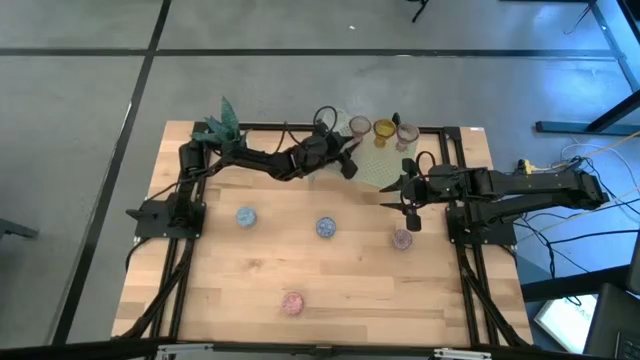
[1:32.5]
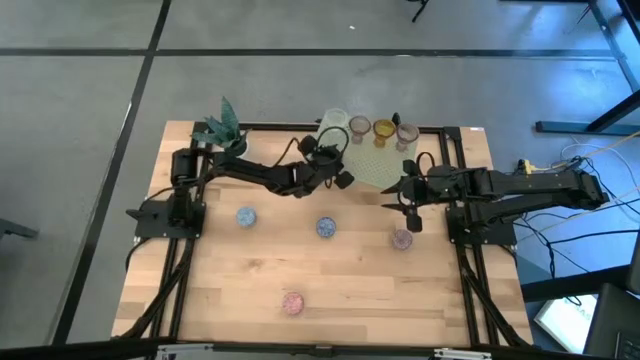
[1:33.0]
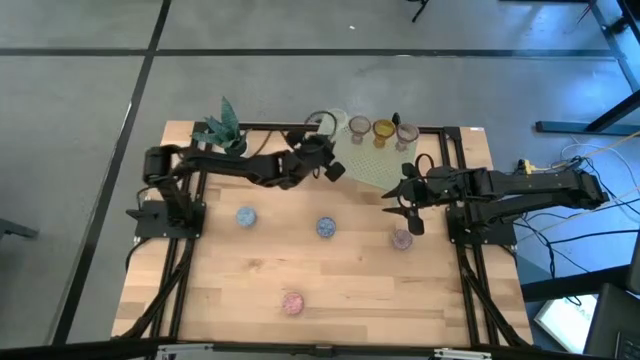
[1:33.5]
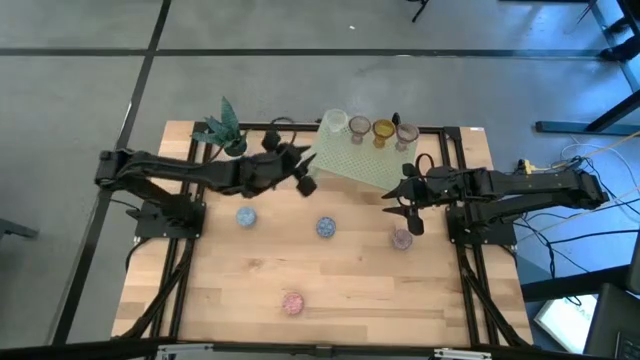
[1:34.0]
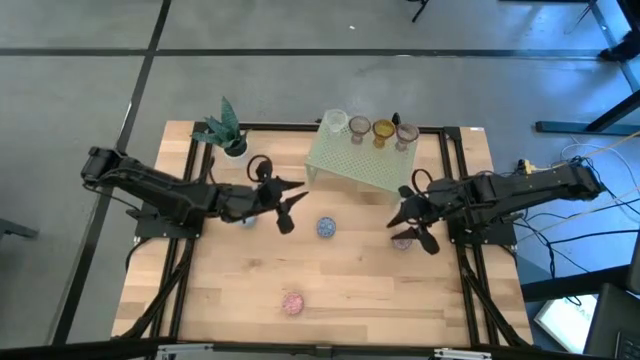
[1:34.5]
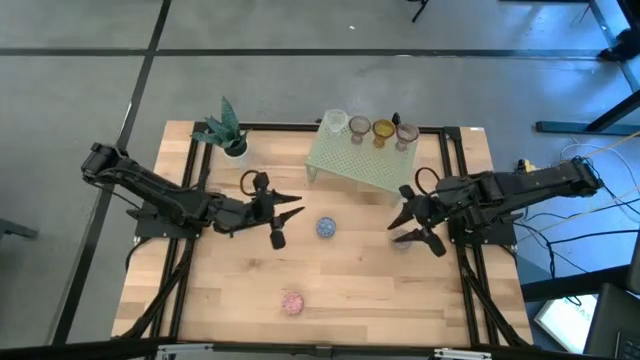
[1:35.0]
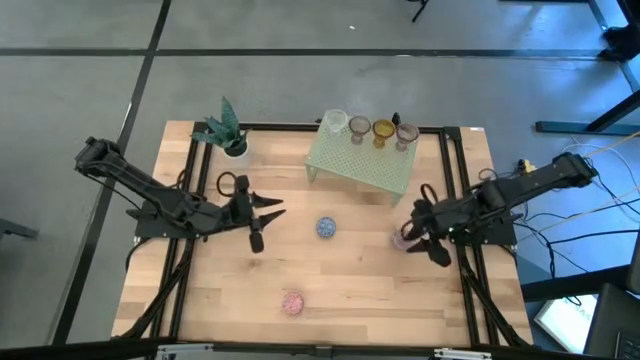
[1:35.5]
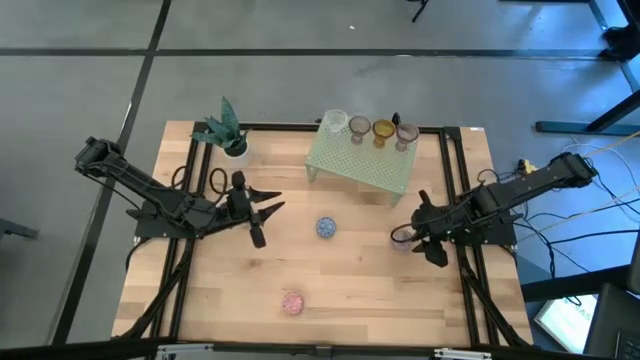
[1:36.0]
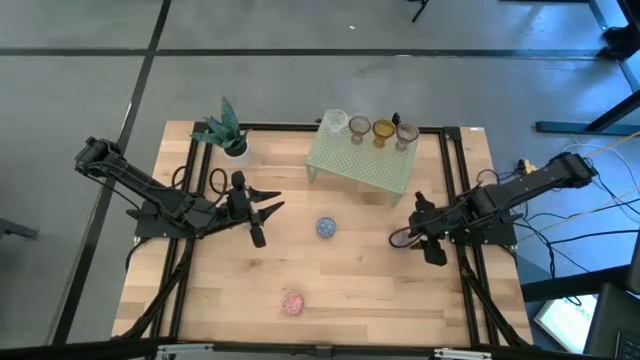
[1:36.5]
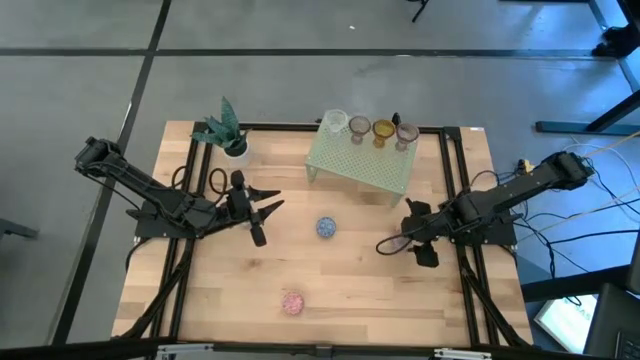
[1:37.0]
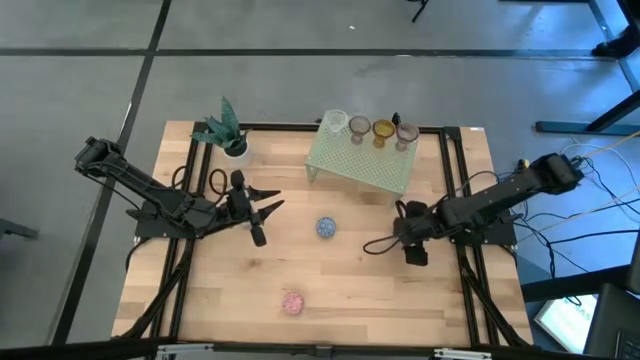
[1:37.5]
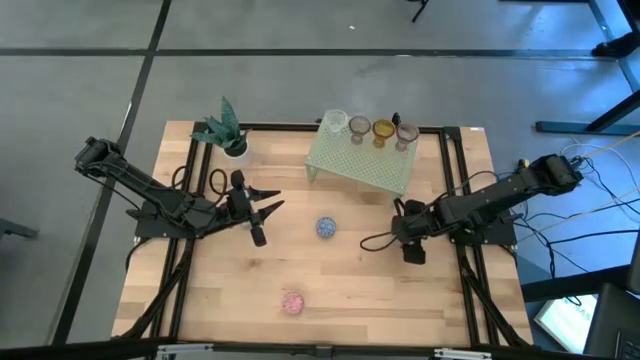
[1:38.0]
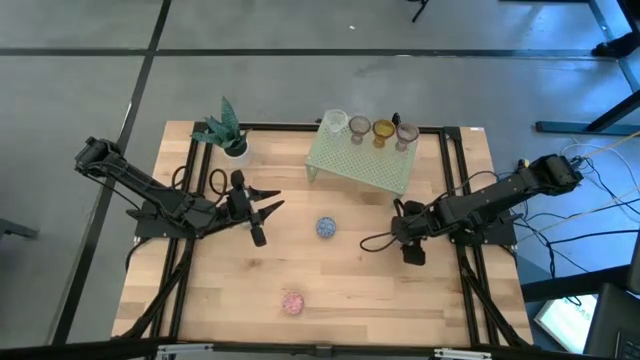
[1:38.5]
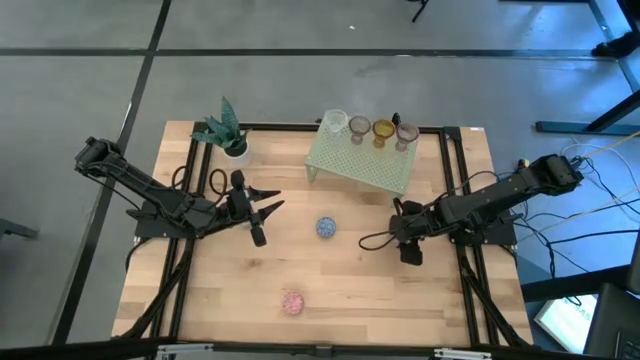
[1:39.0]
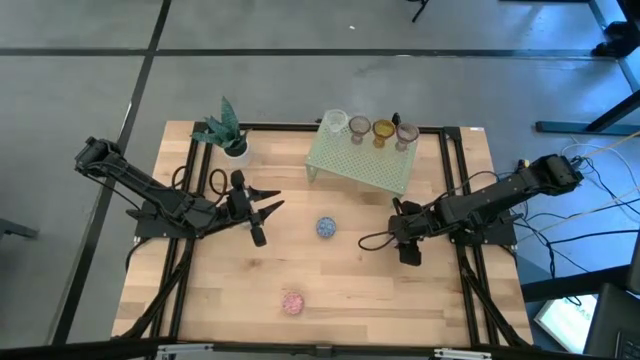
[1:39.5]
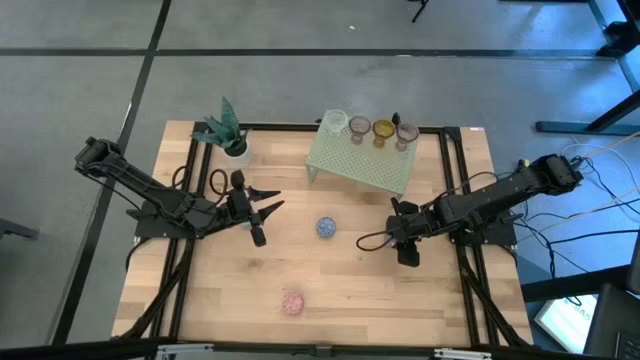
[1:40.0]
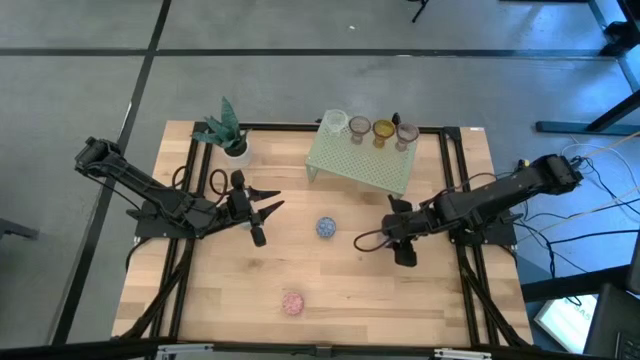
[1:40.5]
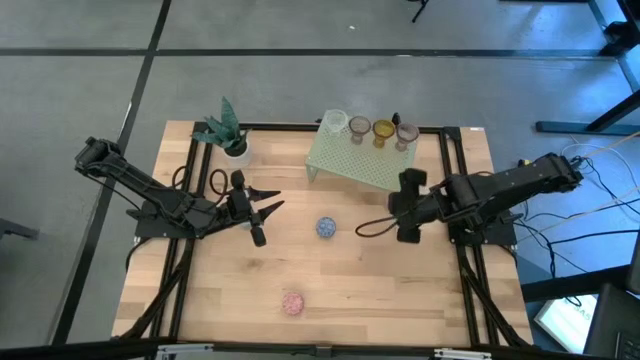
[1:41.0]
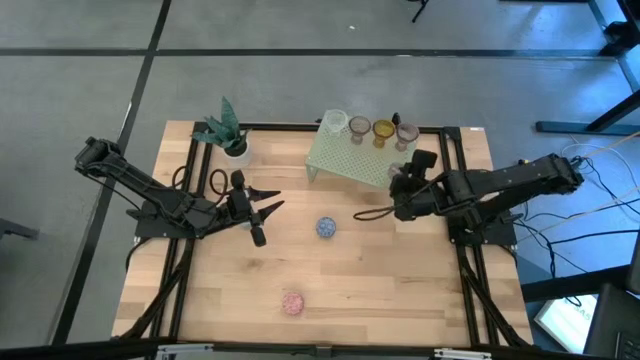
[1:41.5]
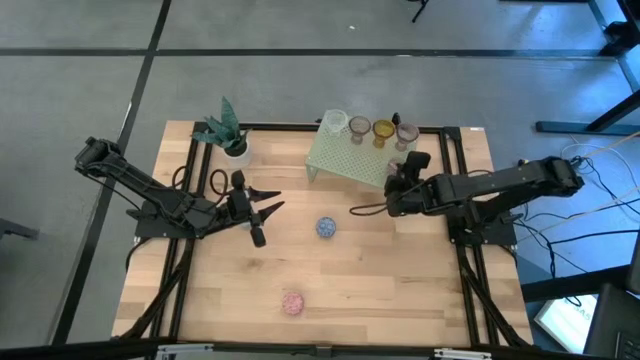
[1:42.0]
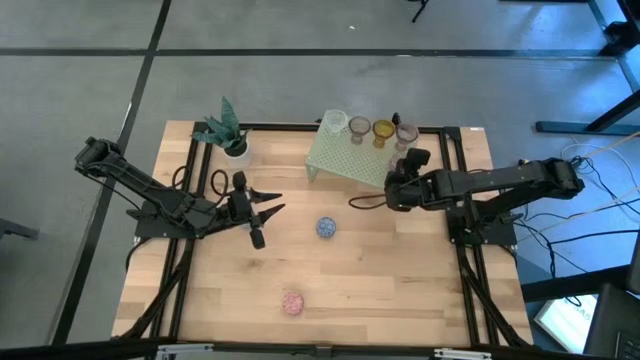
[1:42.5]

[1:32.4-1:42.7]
Task: Pick & Place candle stick holders
Put the red scented candle on the shelf

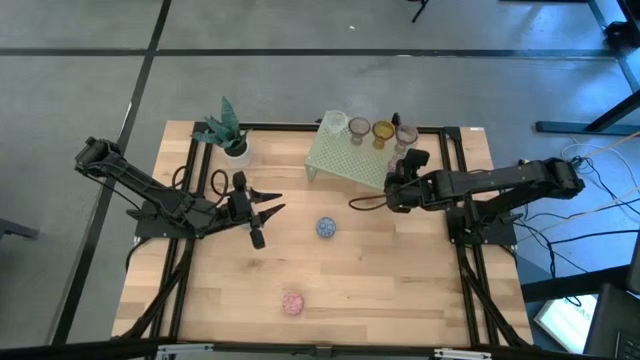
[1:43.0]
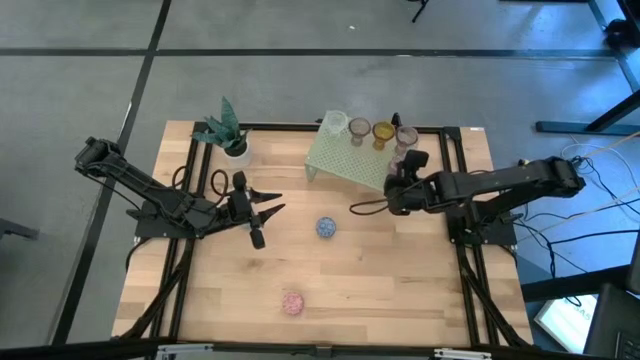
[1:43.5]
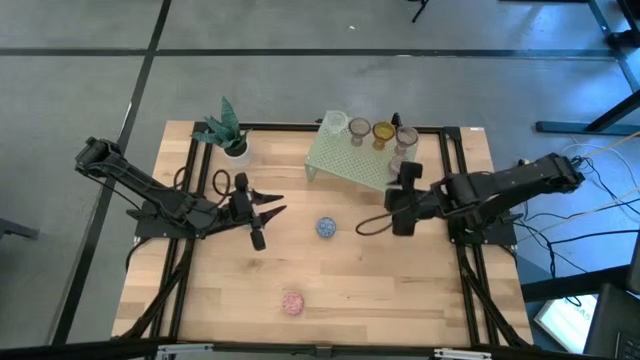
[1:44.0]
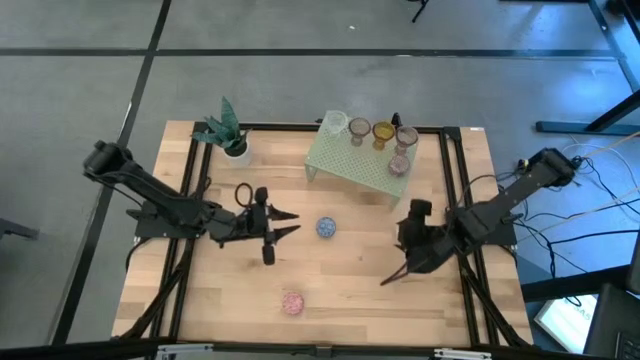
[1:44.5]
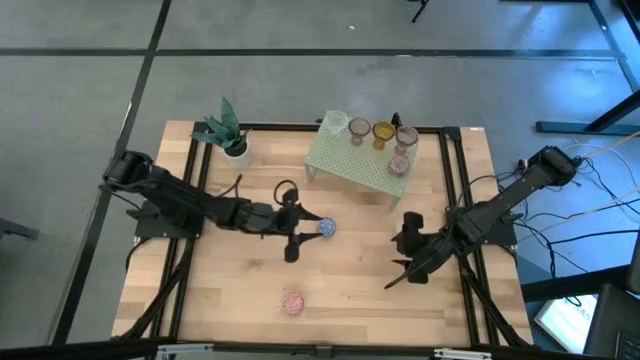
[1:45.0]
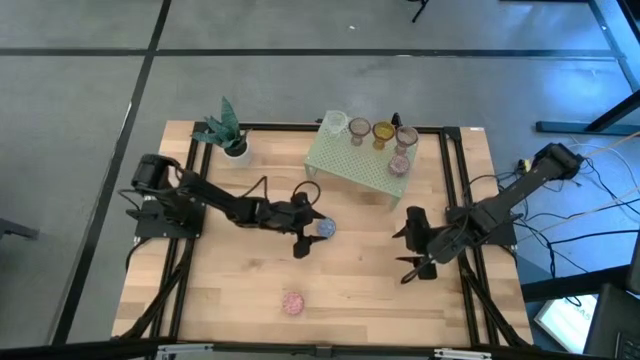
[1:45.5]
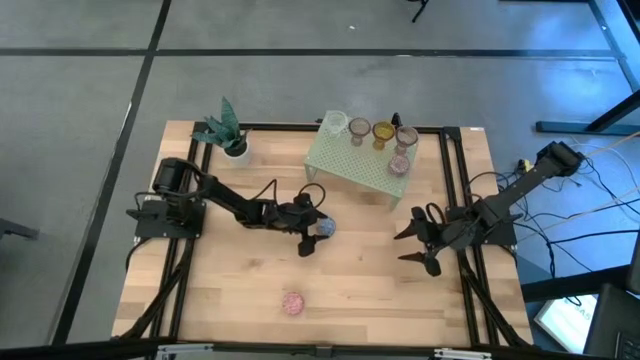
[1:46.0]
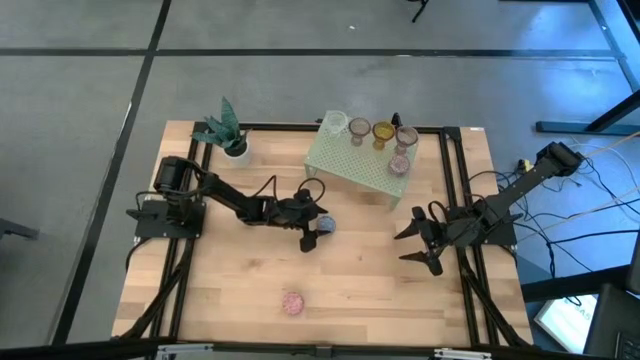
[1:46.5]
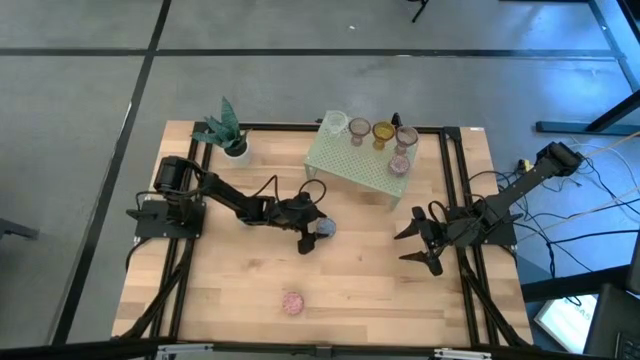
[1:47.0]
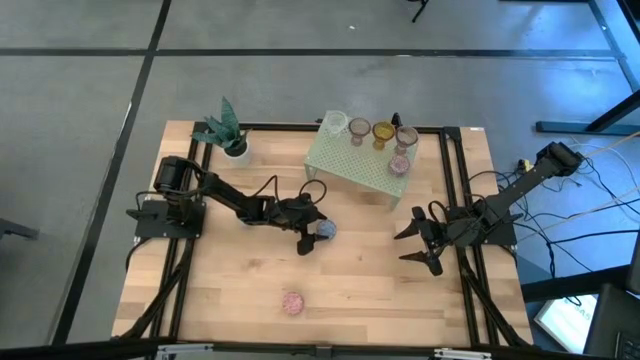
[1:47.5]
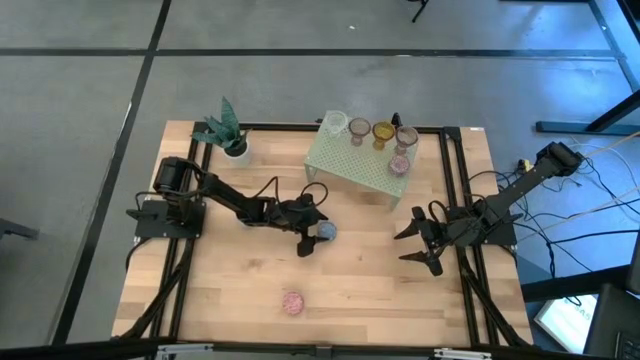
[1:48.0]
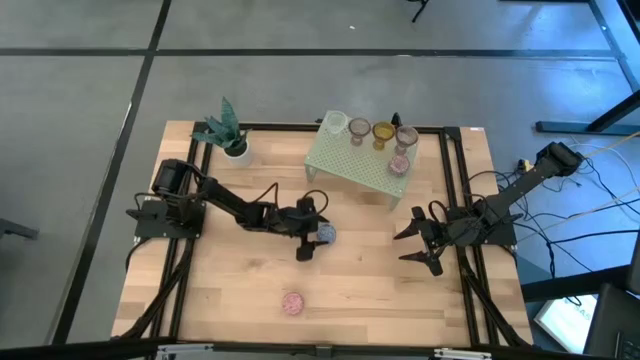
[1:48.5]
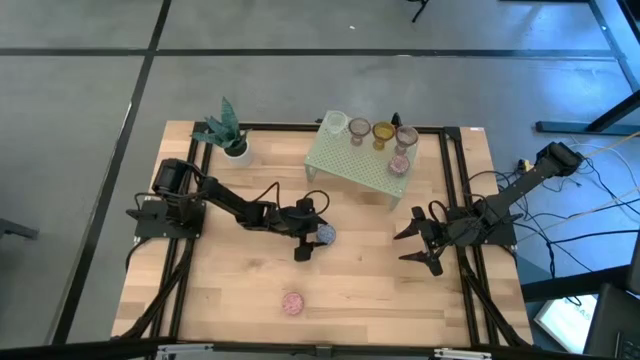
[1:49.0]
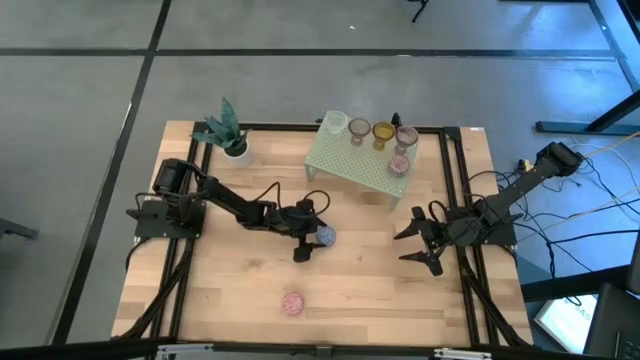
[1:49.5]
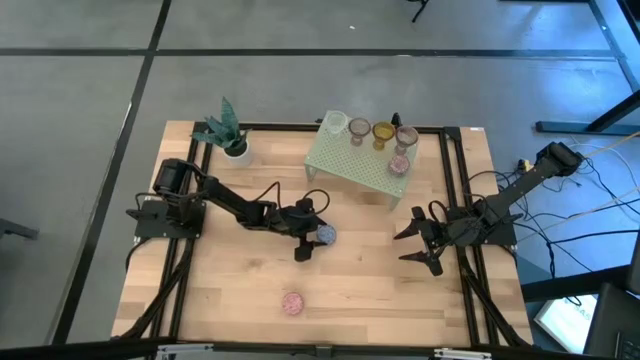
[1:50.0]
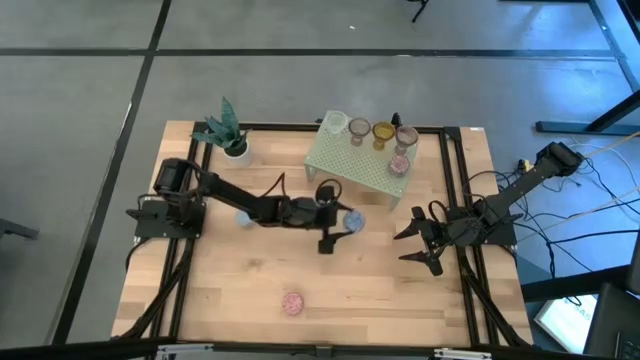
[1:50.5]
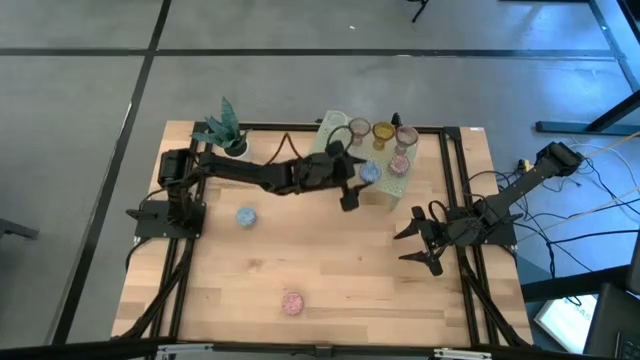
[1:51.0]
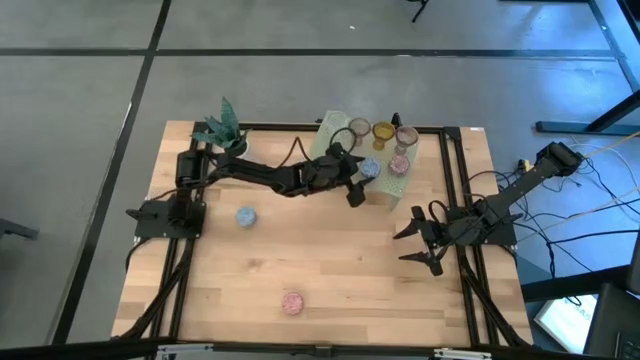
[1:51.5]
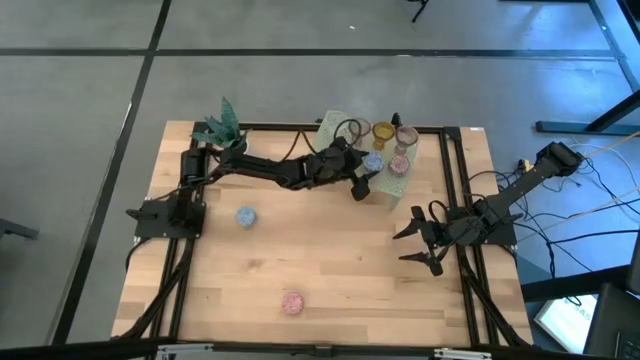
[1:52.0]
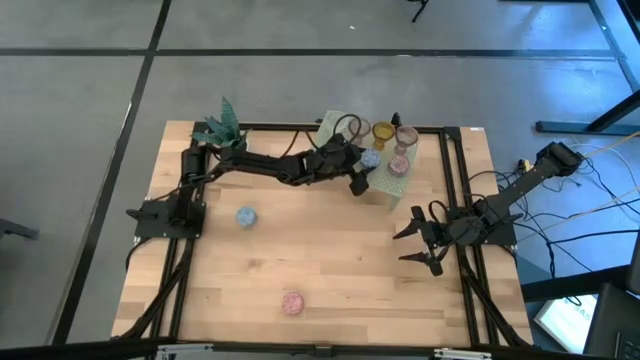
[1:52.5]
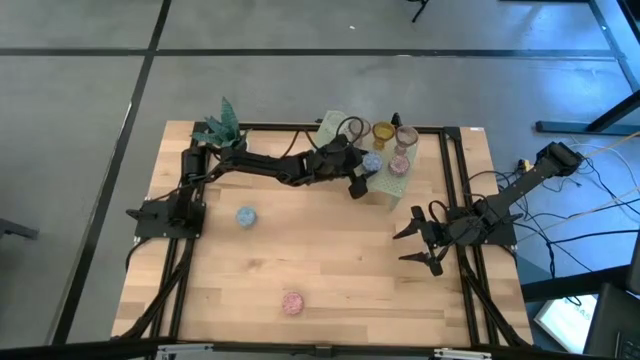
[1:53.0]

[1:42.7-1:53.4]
Put the right blue scented candle on the shelf aligned with the red scented candle
